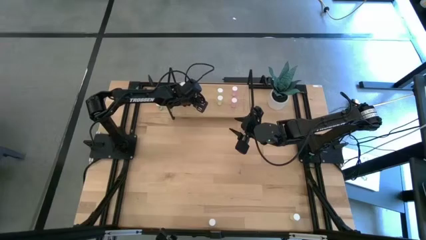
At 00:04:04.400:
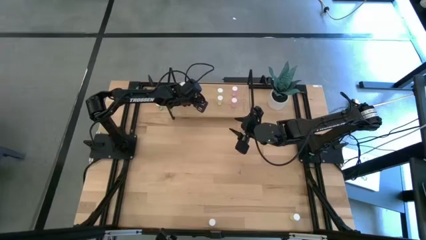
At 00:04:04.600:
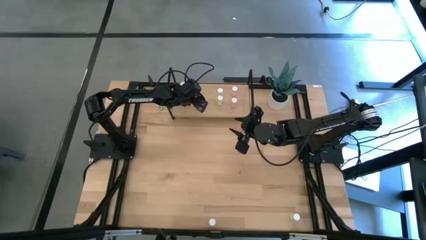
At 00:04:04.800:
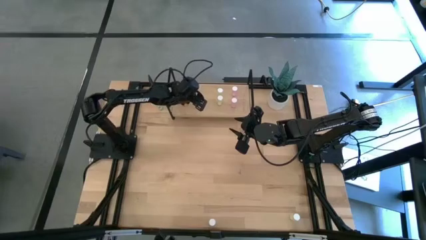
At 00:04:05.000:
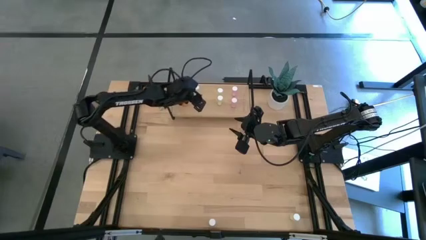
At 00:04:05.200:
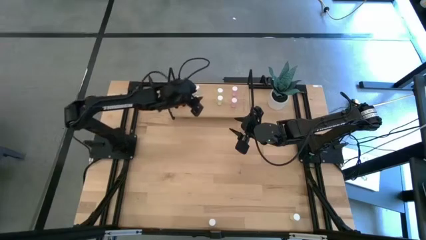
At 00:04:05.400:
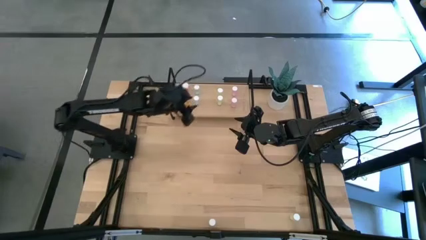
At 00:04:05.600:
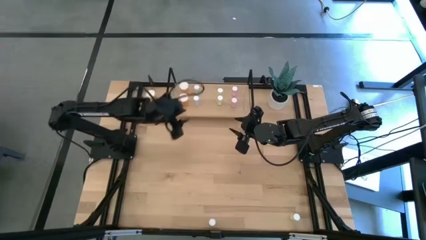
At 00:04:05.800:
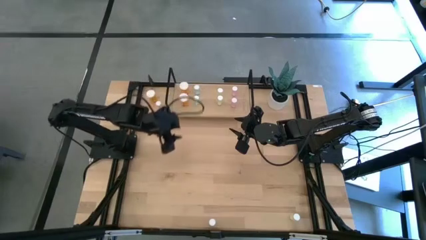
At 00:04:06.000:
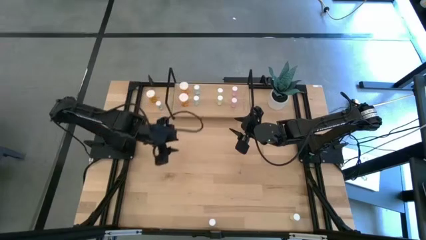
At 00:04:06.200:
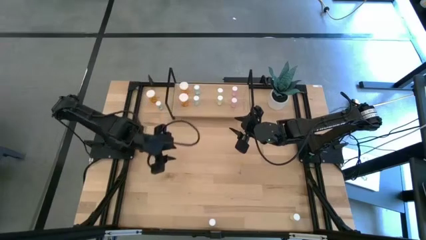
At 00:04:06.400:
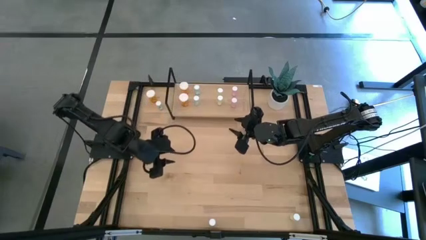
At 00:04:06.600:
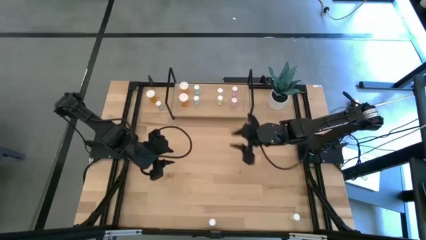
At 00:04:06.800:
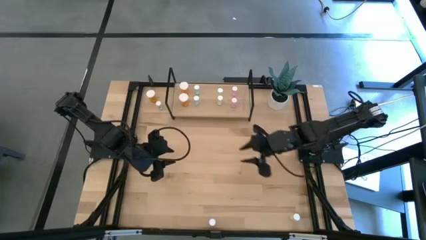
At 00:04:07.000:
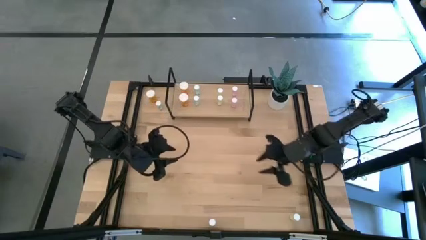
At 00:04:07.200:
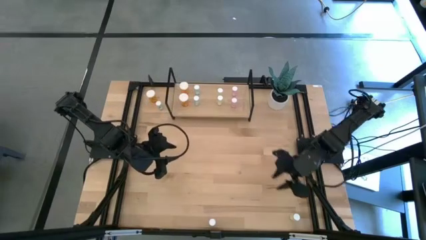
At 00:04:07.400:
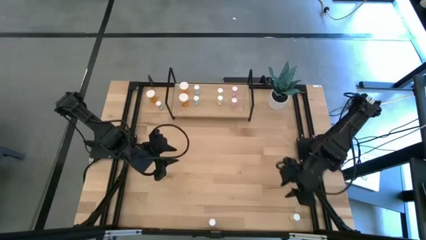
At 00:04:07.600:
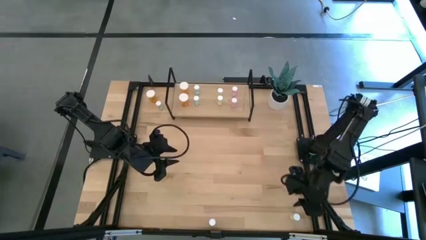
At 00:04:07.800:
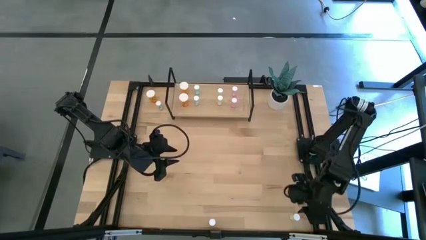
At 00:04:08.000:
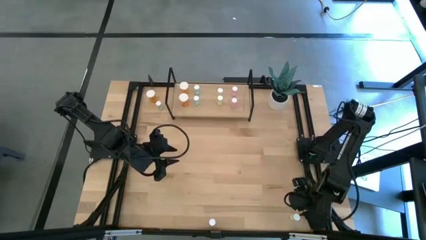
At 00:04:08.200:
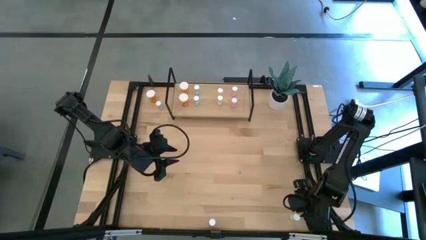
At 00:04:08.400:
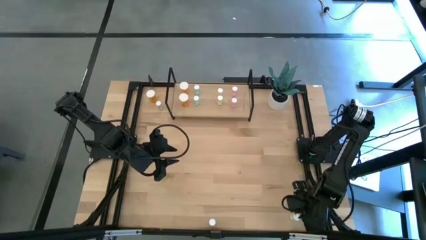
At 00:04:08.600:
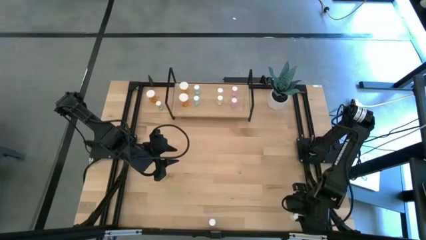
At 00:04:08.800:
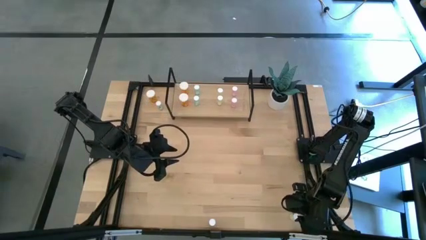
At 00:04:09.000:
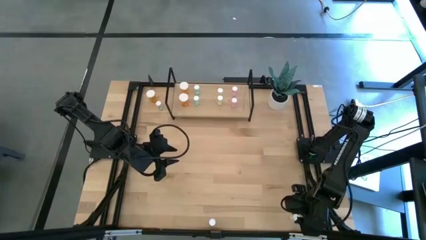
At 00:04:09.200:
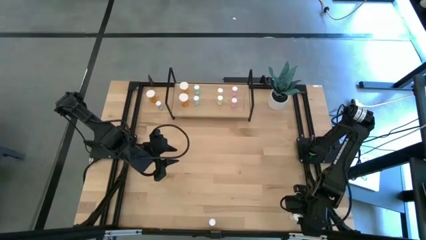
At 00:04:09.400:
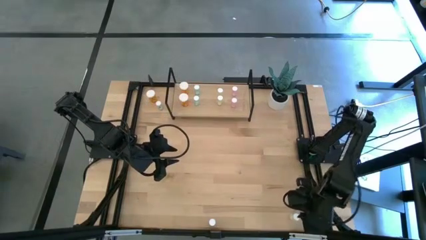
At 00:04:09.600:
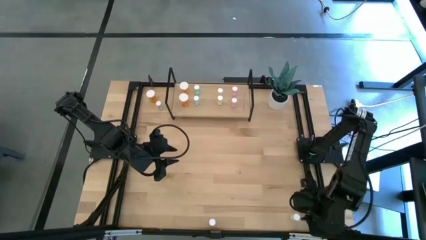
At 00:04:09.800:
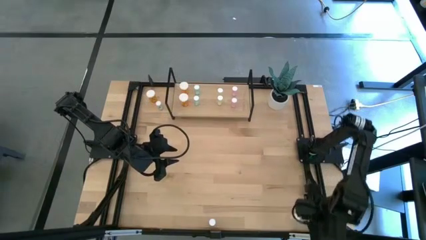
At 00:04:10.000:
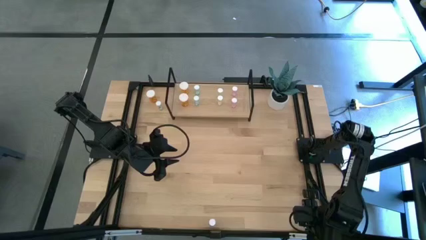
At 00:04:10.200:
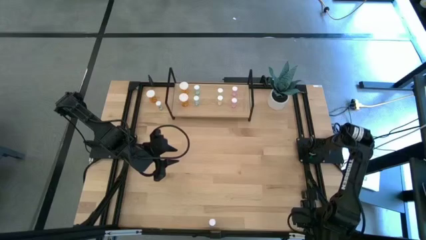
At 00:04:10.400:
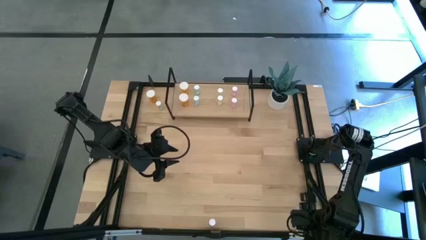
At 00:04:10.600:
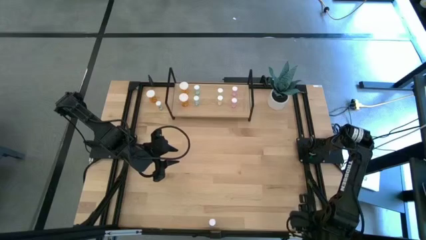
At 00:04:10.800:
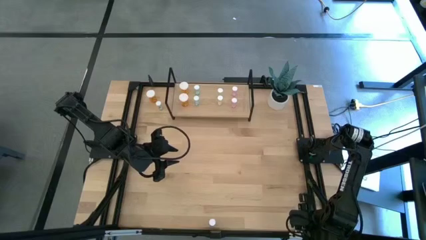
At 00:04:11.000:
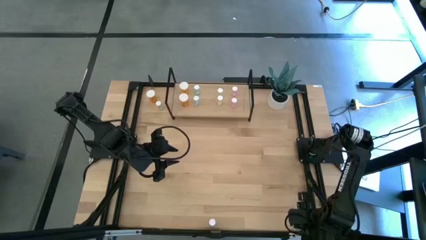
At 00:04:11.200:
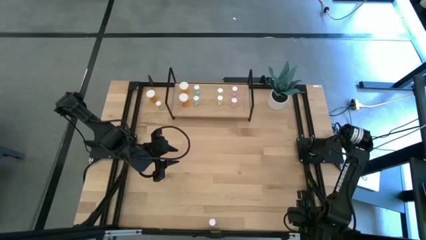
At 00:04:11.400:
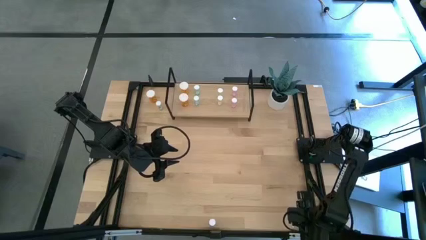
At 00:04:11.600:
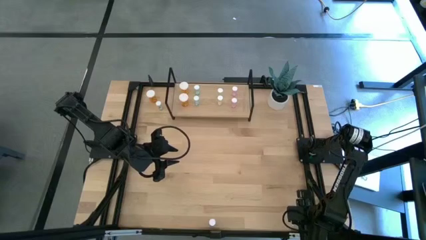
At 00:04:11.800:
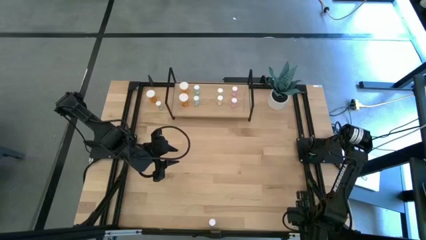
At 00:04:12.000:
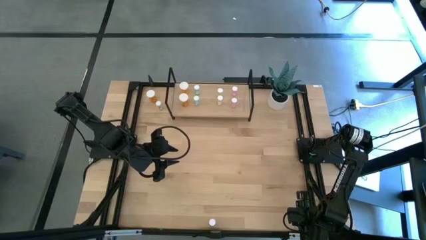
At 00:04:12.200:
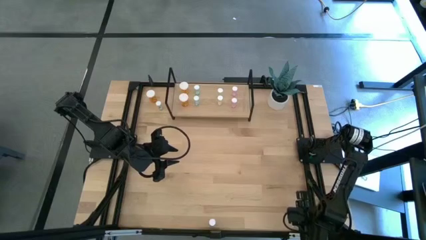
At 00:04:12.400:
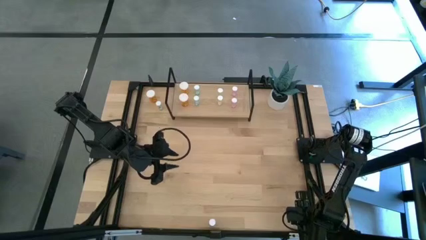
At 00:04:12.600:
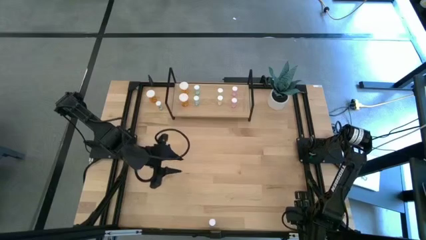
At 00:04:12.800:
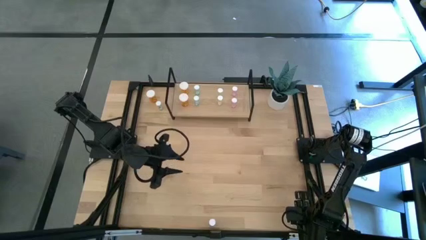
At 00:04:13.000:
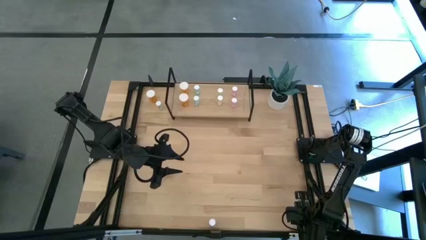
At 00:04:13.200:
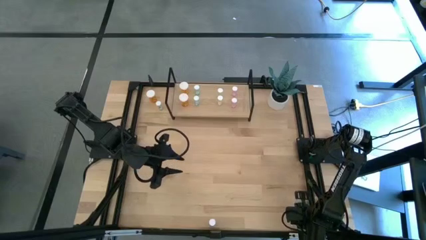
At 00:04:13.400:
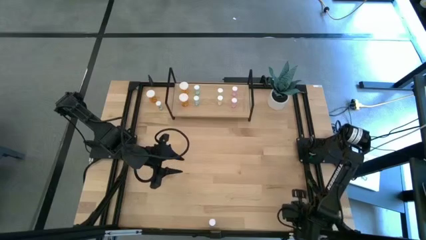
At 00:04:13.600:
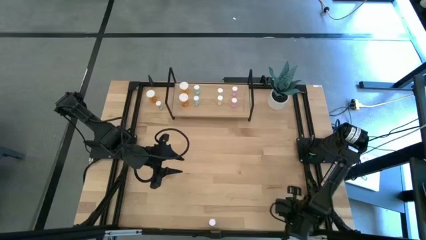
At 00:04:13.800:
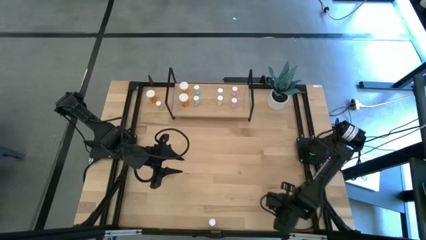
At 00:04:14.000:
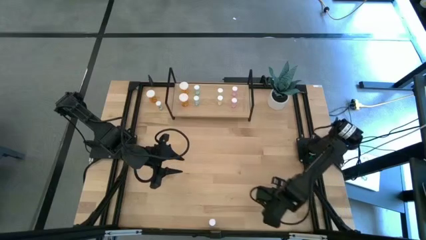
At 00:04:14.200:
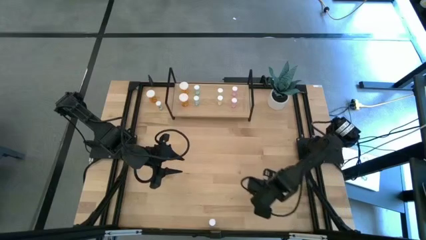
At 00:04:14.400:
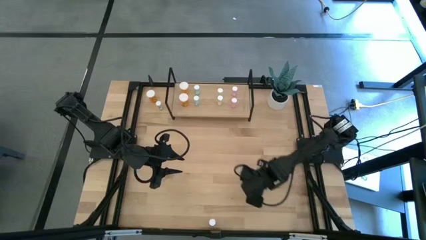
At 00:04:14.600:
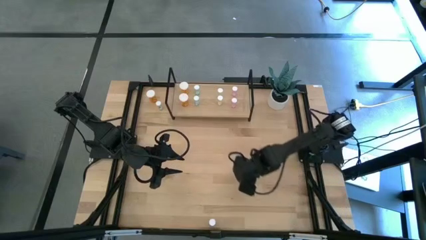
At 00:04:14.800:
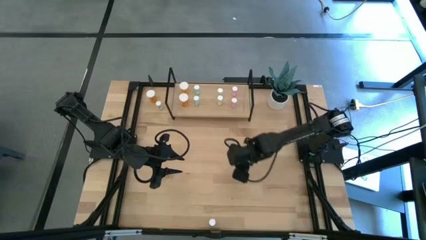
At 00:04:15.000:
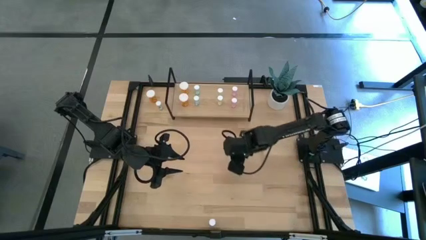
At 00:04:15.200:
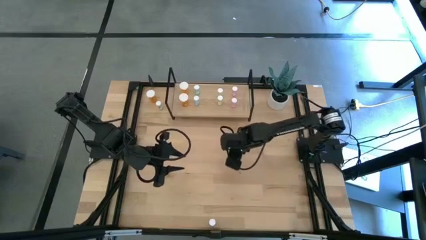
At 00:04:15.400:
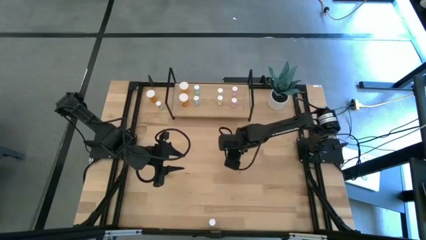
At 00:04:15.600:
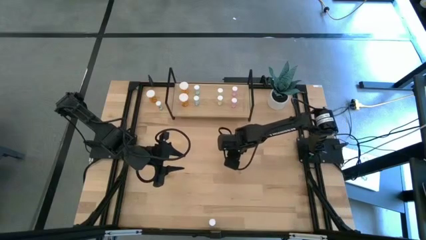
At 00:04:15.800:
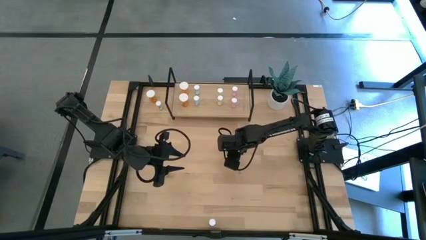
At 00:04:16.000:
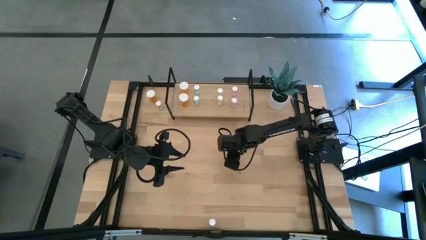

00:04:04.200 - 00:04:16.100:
Task: Pick and place medicine bottles onto shelf by color
Put the yellow pill bottle on the shelf aligned with the other yellow pill bottles
